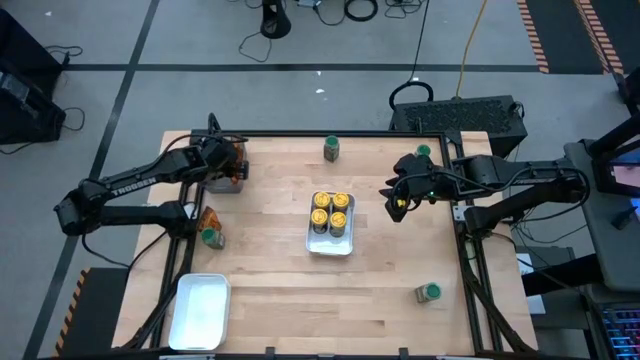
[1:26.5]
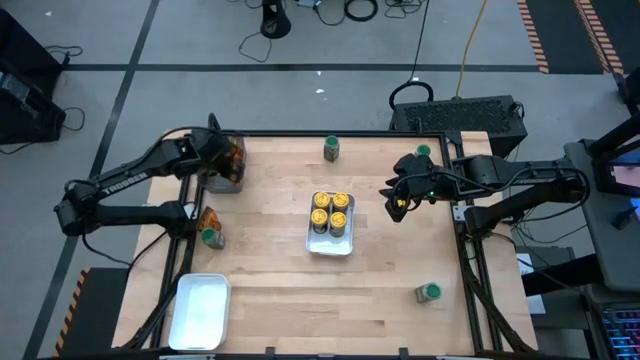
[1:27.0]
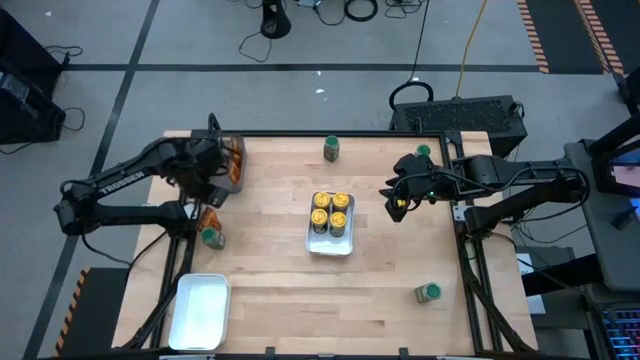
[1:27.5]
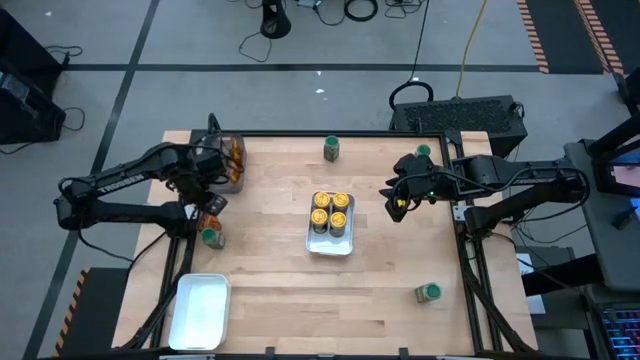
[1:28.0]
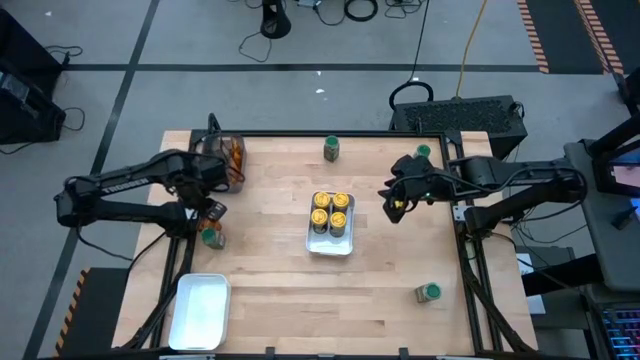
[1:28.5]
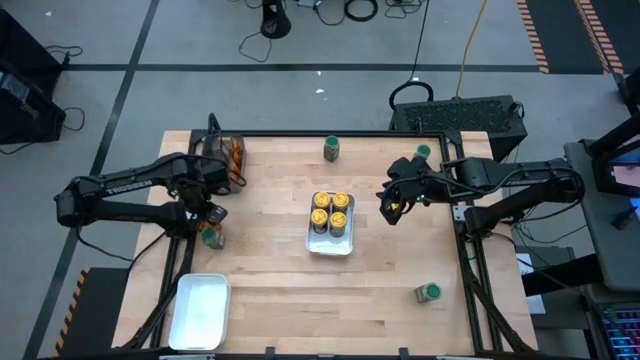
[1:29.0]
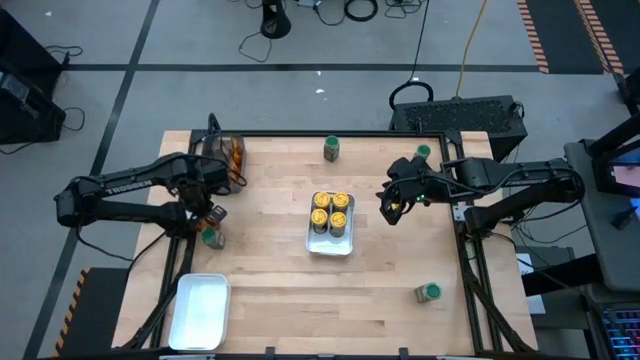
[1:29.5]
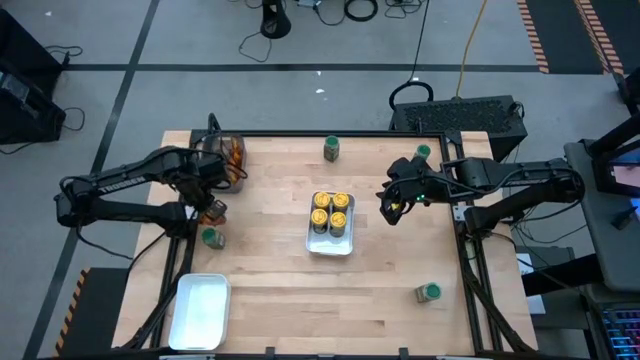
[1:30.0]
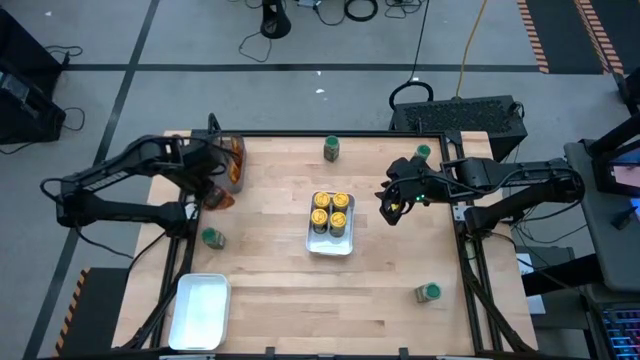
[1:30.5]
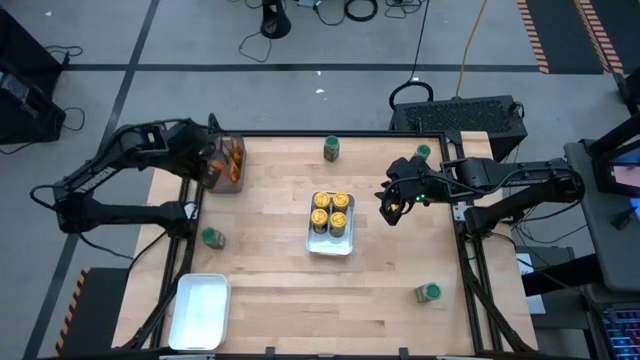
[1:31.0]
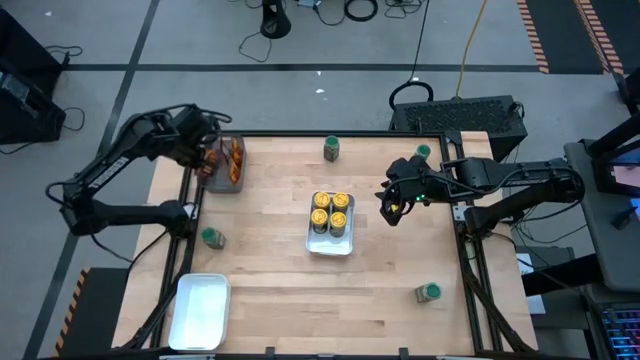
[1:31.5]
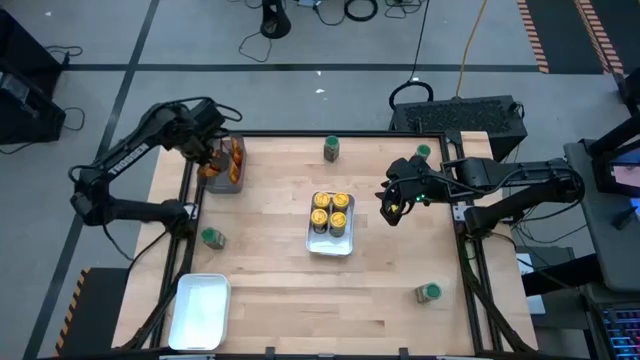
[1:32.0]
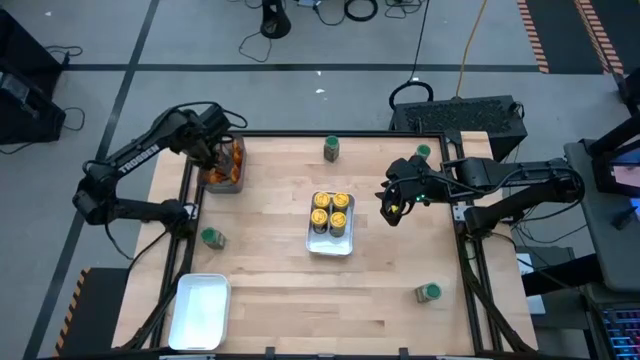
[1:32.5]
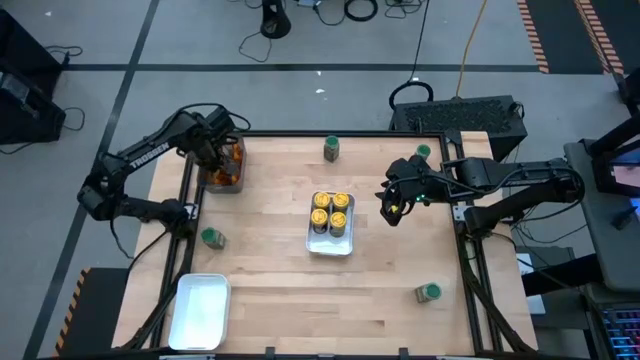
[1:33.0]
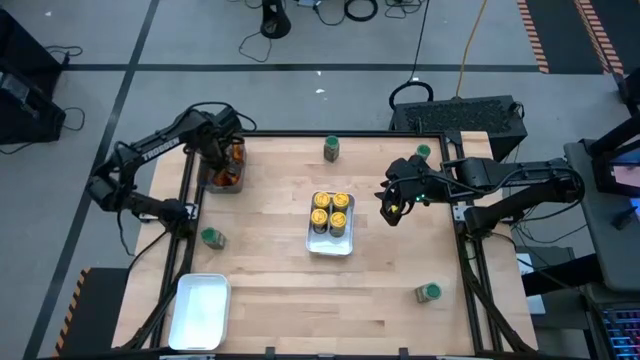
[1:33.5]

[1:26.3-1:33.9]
Task: Sort spices by type
Put the brown spice pouch into the black transparent bin

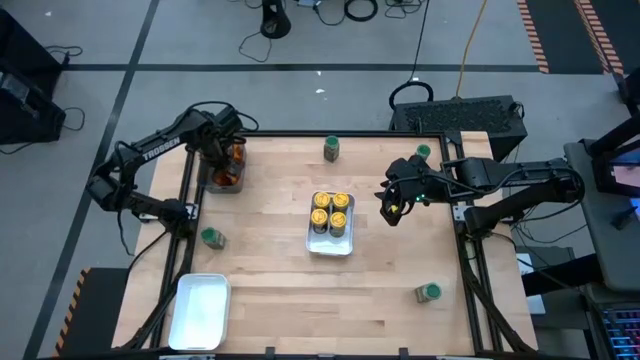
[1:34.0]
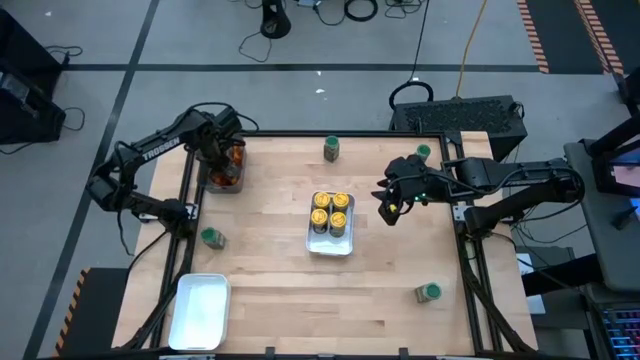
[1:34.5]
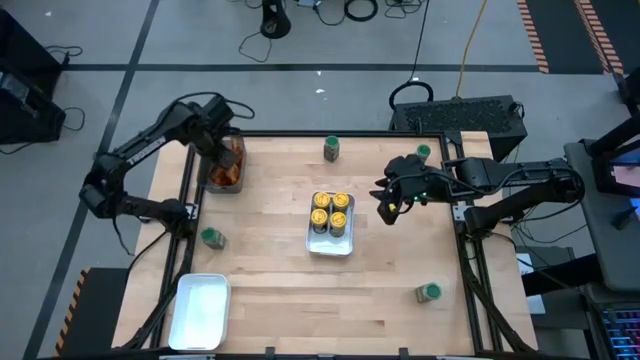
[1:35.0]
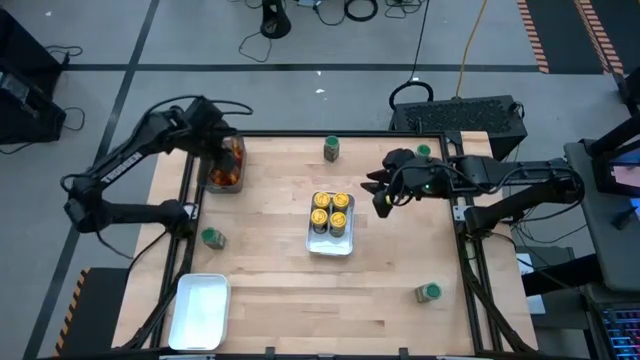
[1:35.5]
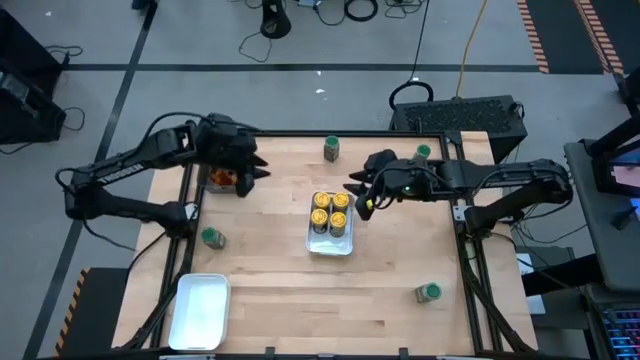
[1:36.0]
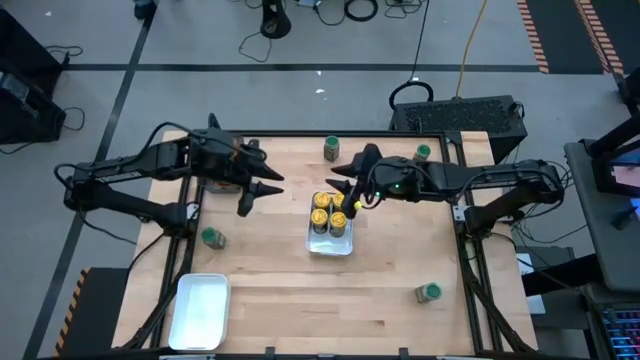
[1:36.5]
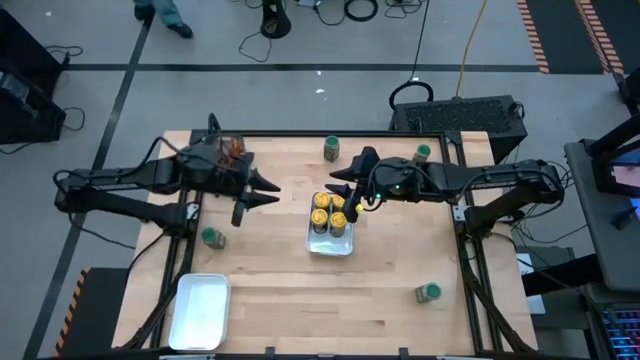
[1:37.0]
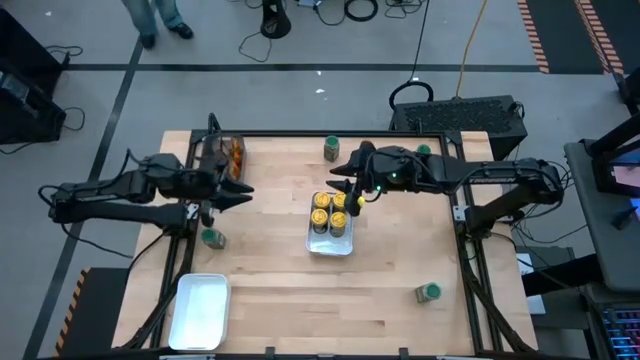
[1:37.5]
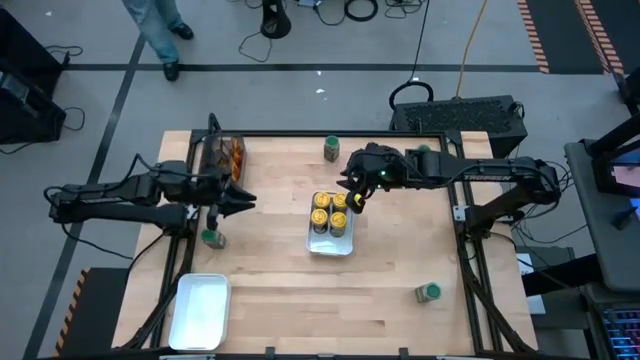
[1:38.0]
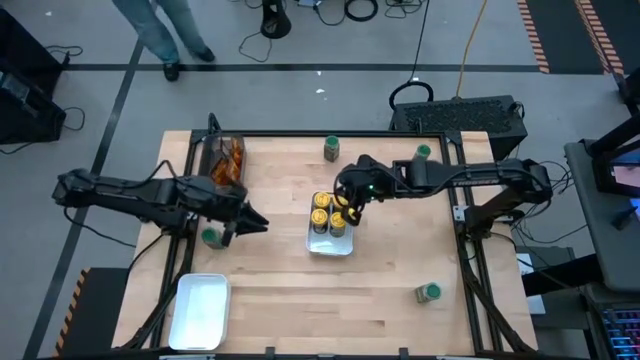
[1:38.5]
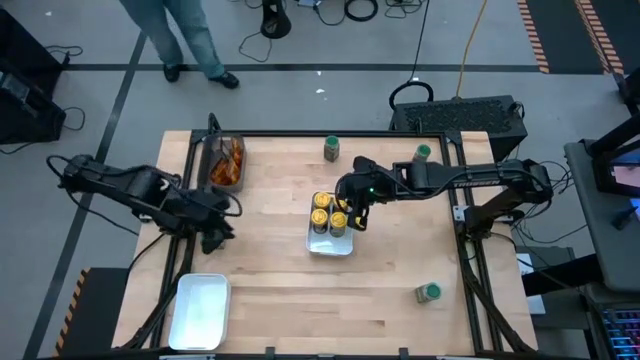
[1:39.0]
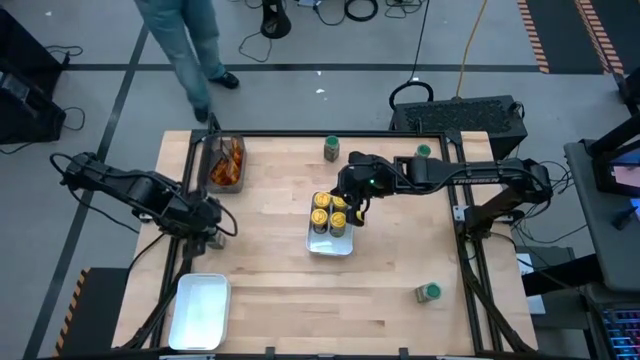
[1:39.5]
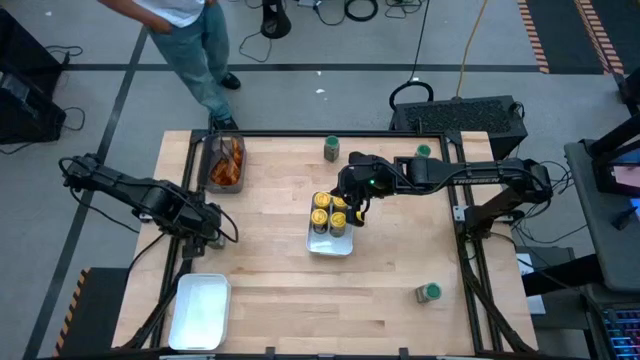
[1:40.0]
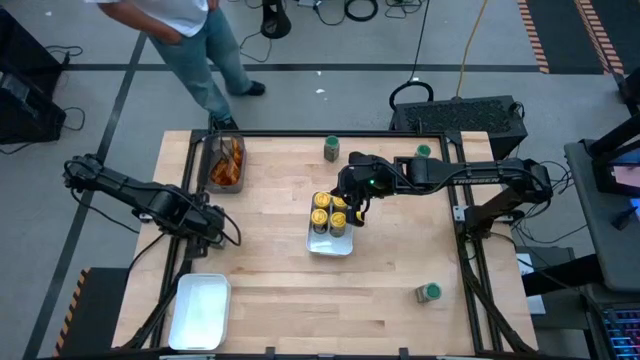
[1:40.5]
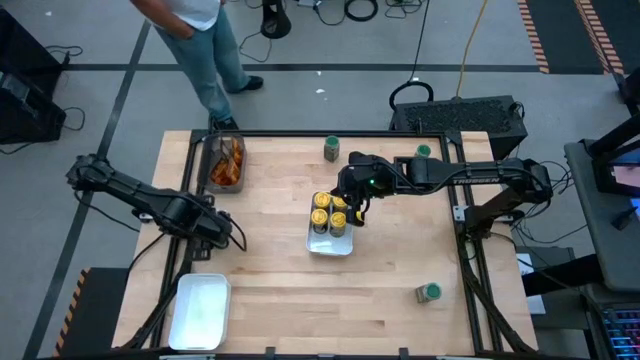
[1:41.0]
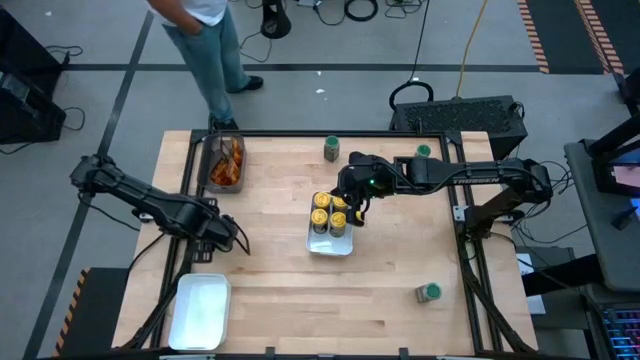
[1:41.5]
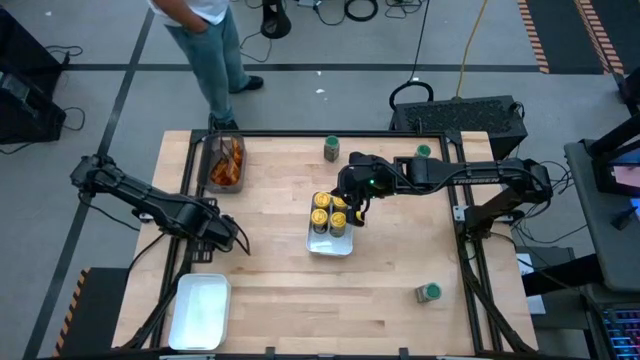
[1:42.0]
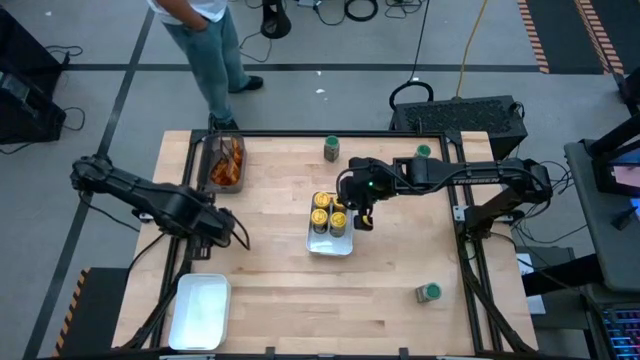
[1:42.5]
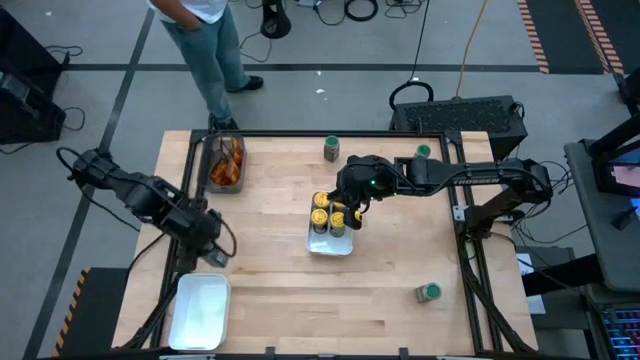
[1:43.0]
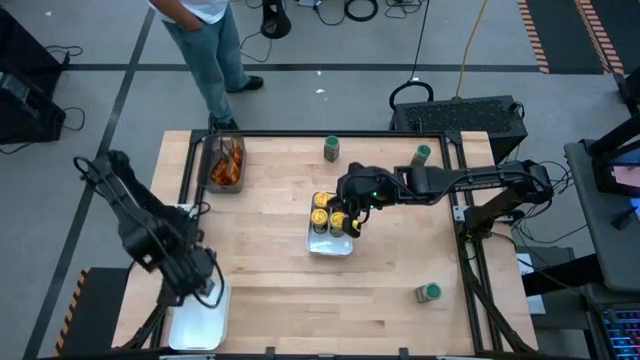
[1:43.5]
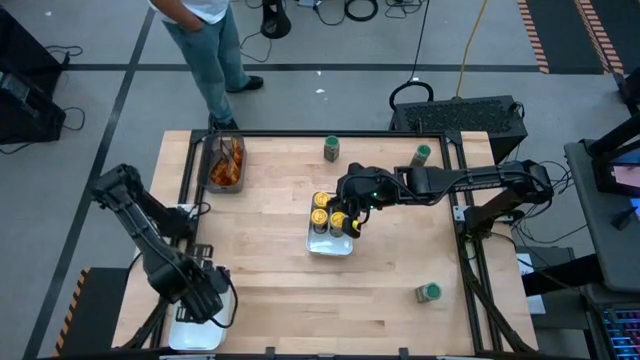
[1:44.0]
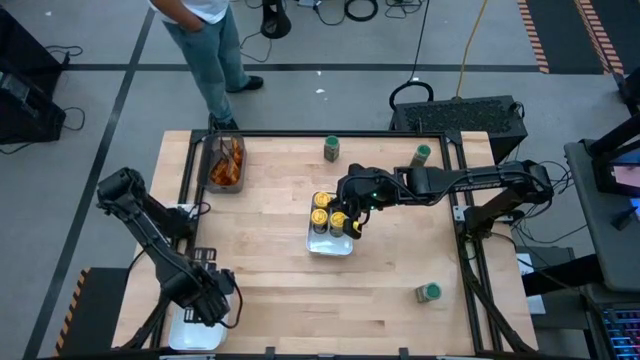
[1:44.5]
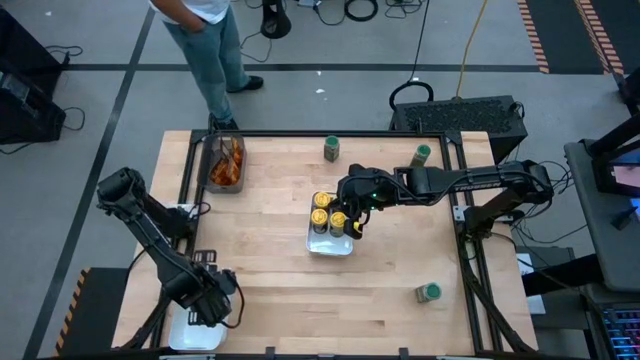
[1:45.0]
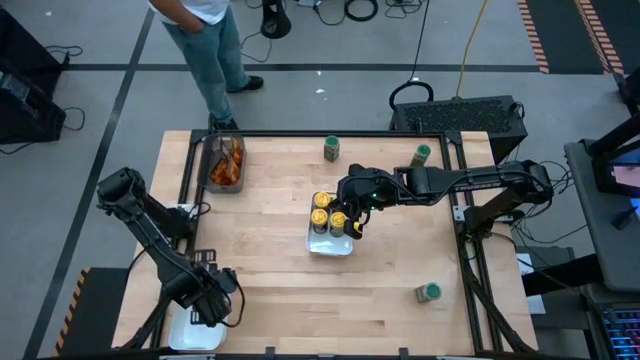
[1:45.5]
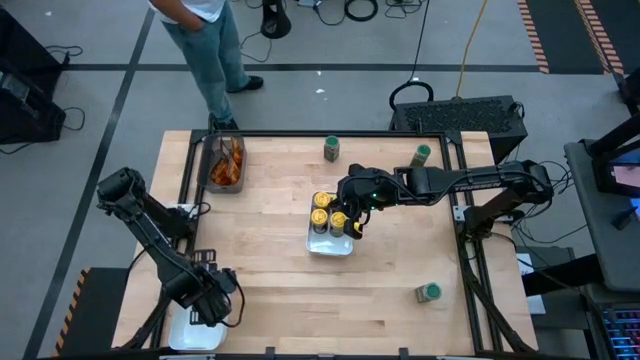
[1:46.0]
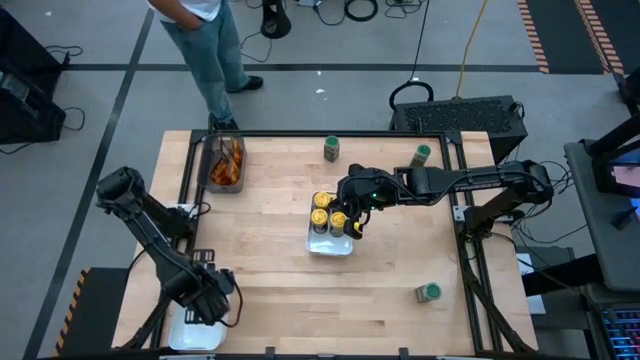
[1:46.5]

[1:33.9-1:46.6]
Put the middle left green spice bottle into the bottom white bin
